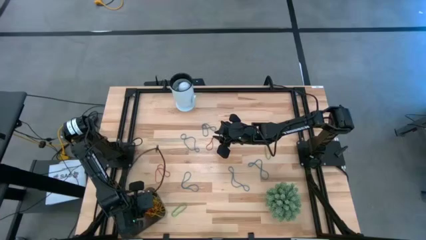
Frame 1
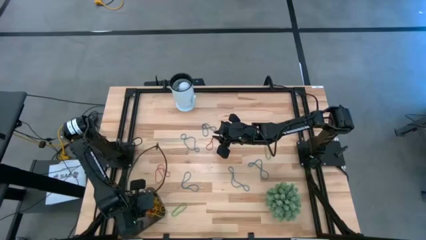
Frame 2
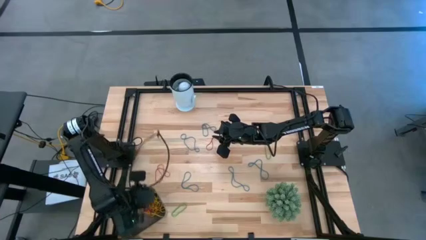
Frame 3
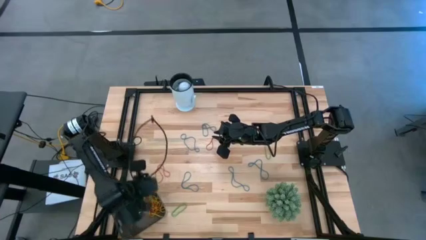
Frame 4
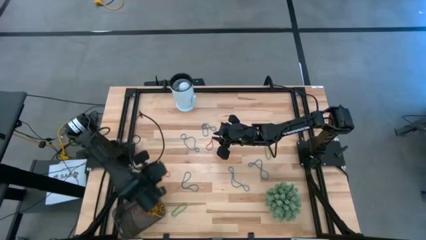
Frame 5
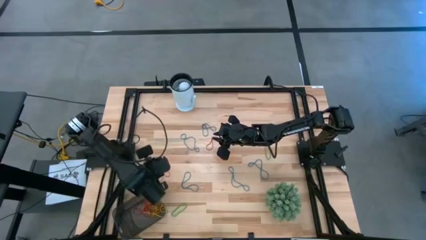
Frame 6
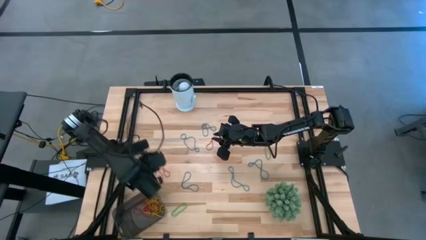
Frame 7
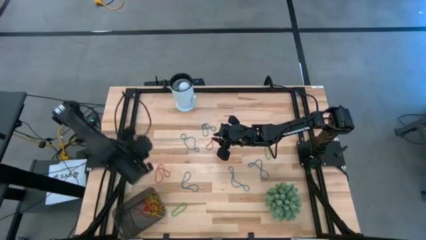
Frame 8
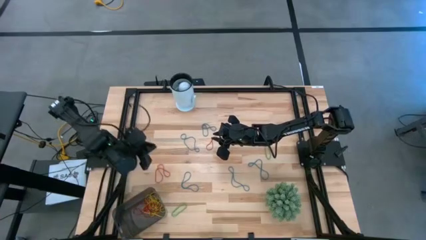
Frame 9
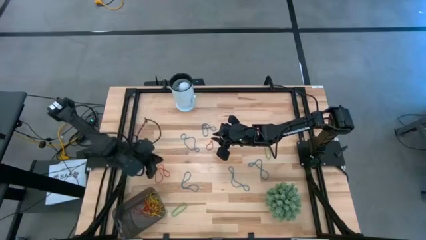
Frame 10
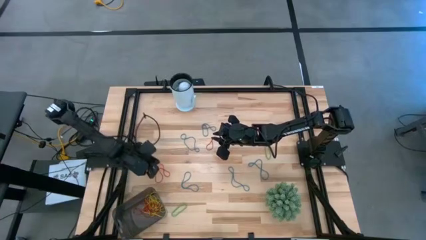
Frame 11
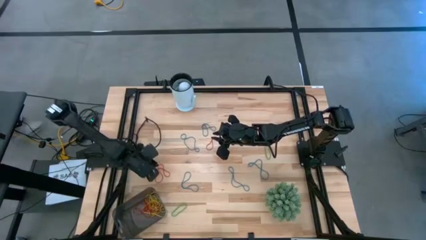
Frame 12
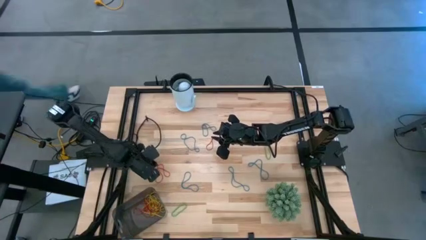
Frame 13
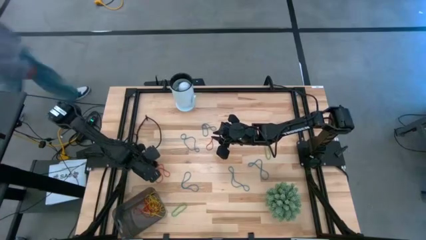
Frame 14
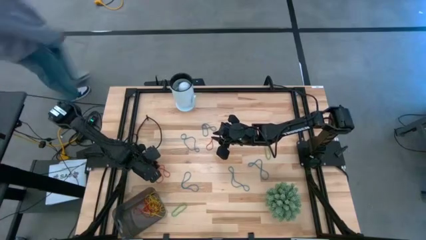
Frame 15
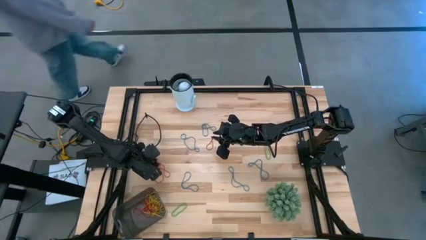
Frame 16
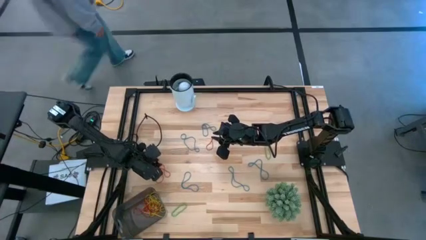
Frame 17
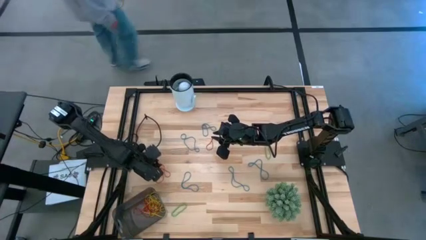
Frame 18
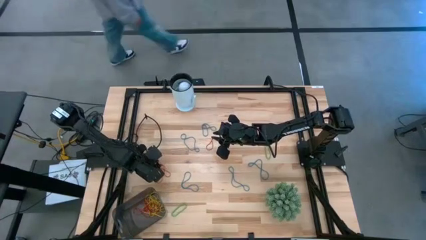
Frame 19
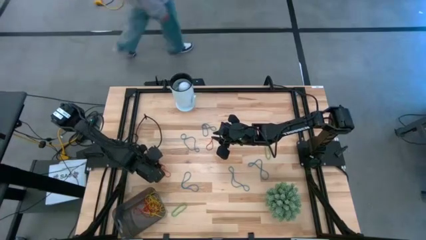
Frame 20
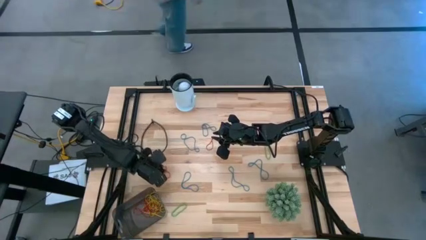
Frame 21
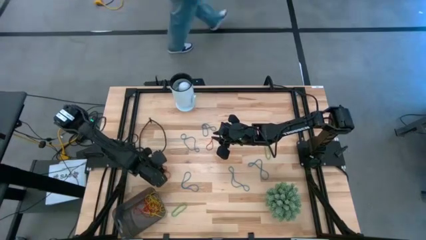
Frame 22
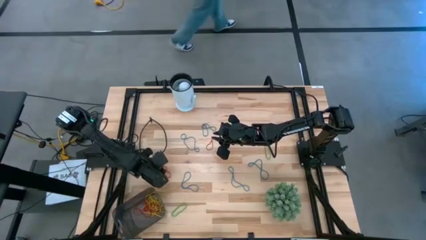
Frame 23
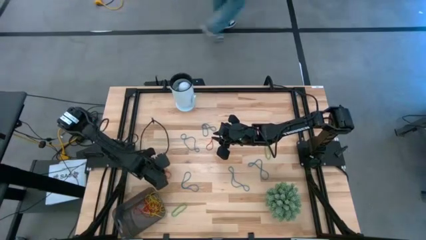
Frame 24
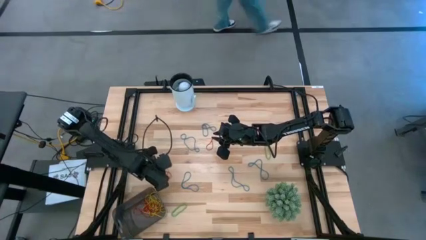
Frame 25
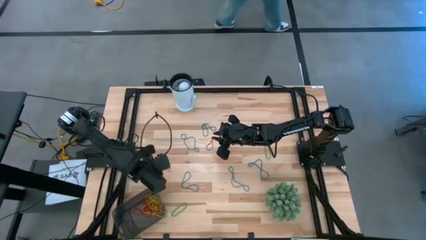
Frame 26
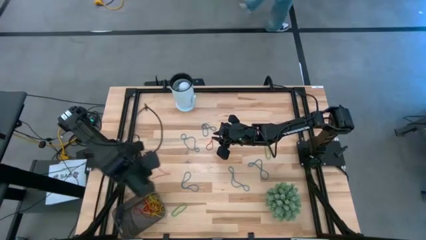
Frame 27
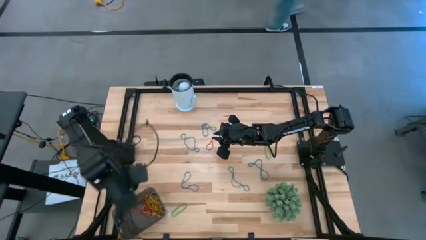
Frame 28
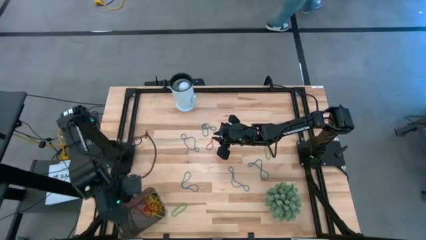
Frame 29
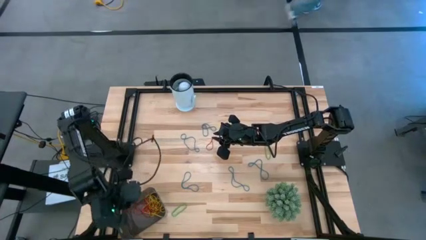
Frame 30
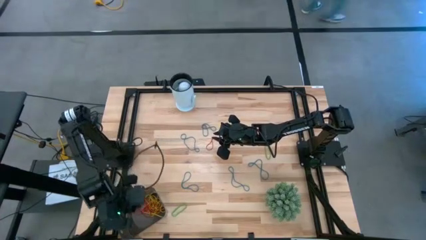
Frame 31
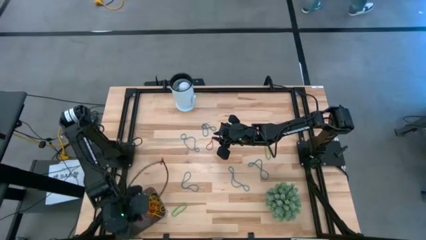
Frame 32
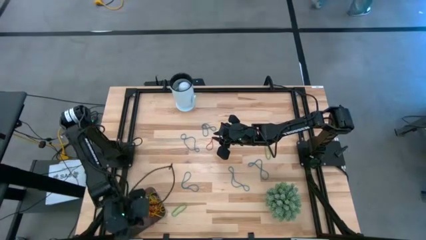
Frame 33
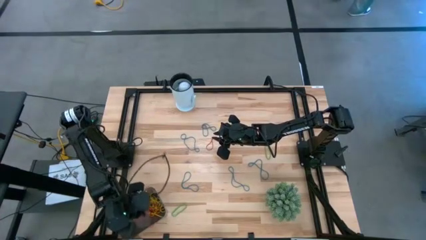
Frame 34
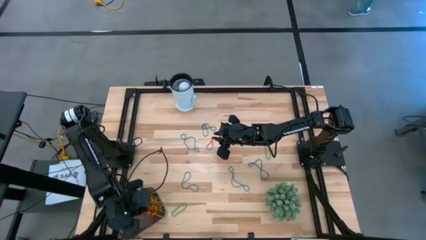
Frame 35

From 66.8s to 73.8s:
Task: Pick and place items into bin
Put the red rubber band into the black bin

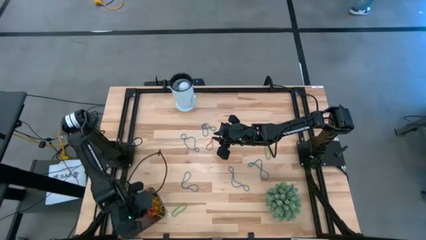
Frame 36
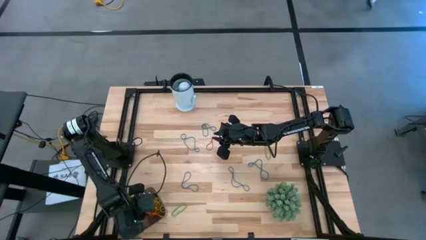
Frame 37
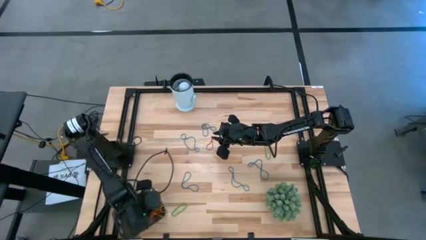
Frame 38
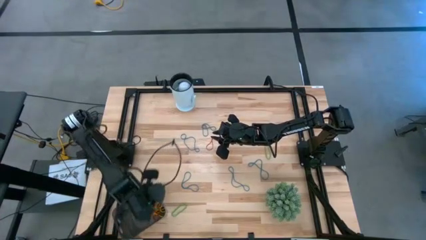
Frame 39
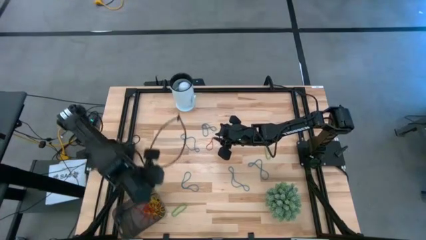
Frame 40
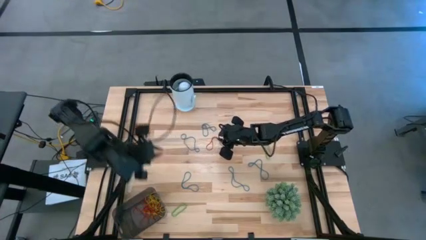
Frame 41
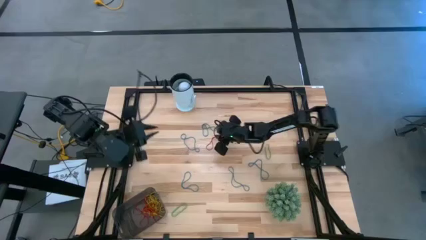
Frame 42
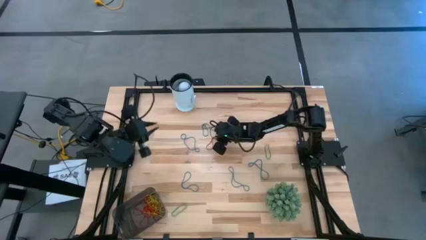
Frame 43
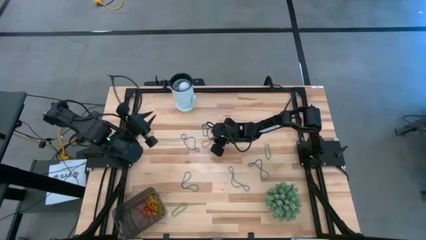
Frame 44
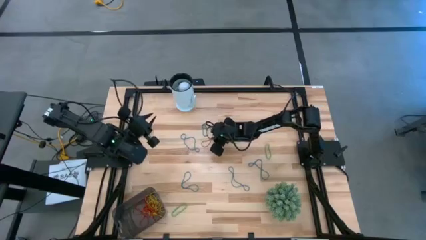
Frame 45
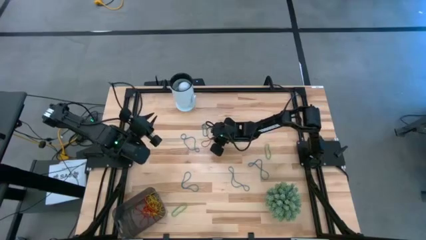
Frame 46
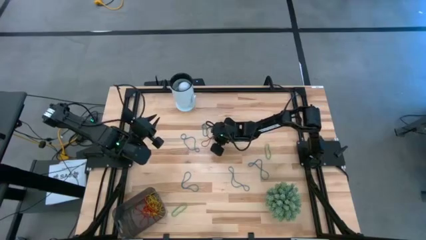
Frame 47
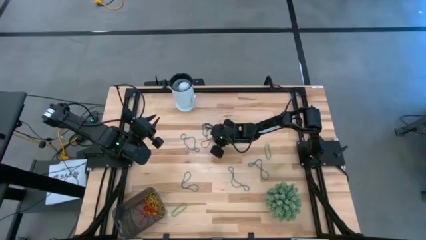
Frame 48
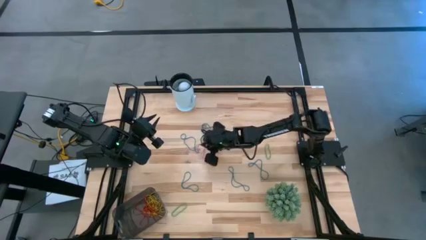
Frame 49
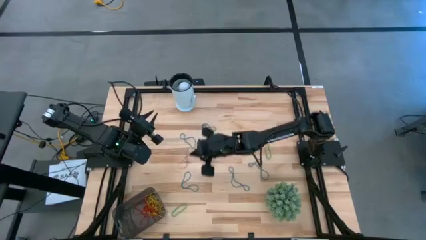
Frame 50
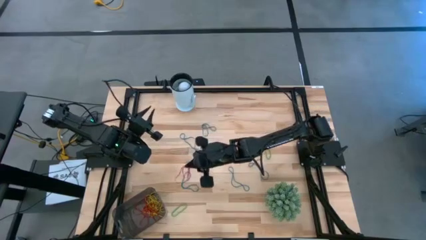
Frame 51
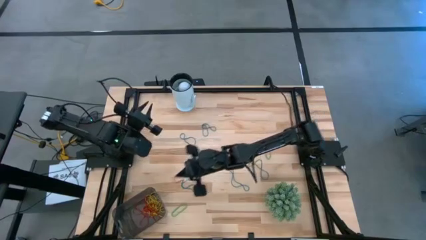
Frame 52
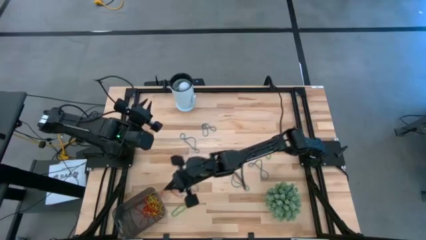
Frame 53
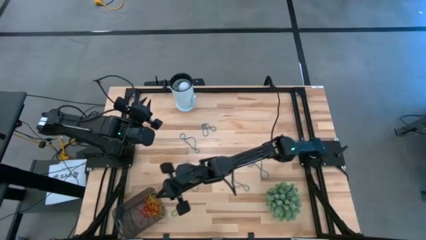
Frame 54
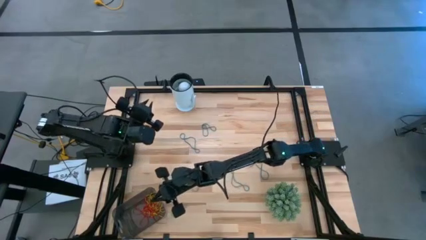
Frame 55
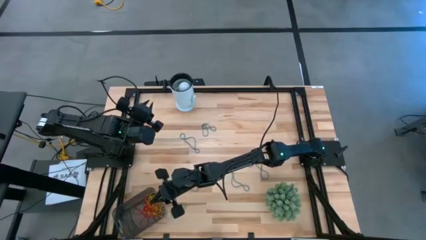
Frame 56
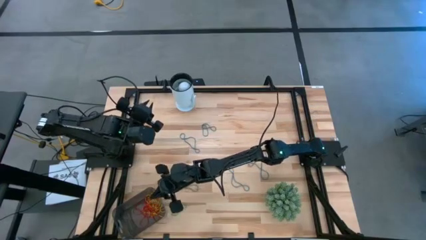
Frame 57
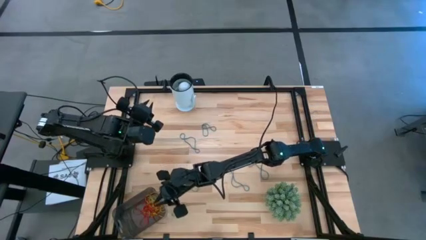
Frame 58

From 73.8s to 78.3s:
Put the red rubber band into the black bin

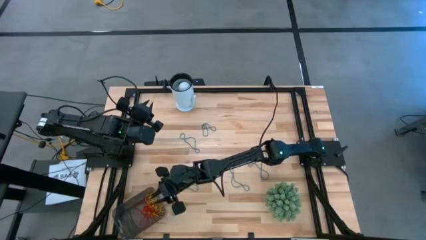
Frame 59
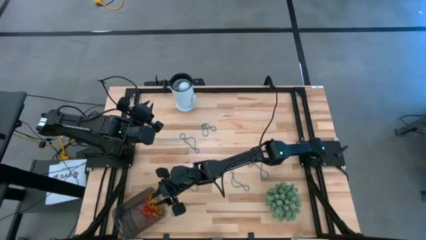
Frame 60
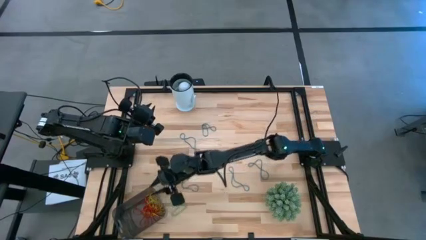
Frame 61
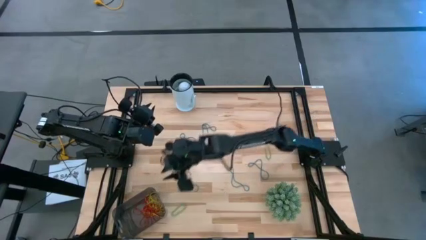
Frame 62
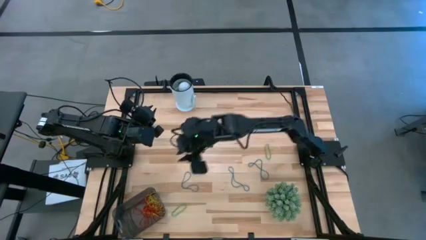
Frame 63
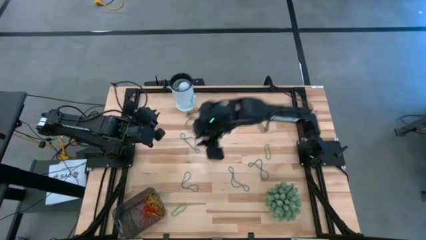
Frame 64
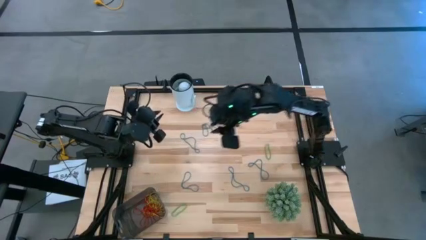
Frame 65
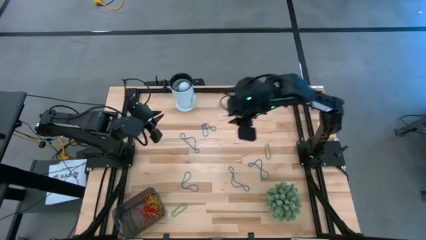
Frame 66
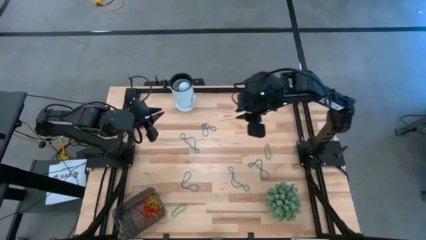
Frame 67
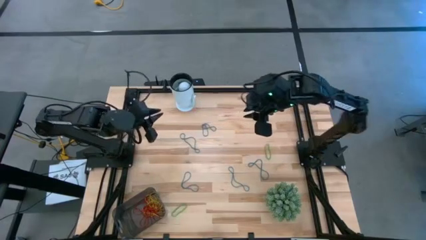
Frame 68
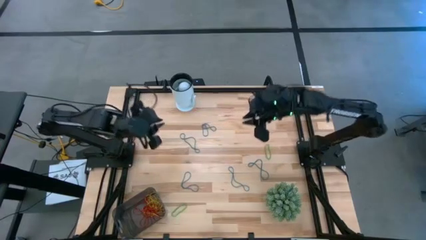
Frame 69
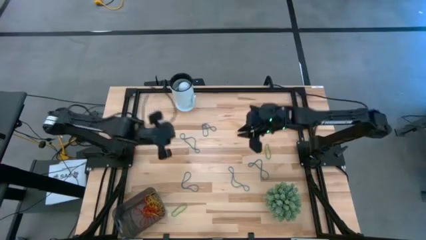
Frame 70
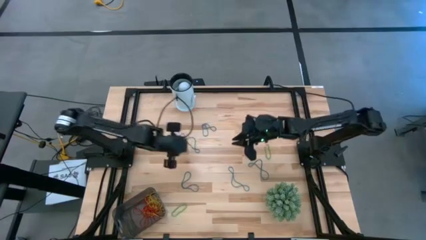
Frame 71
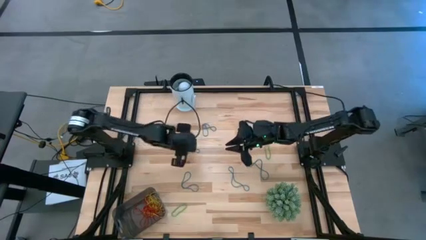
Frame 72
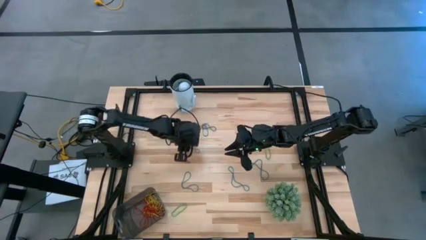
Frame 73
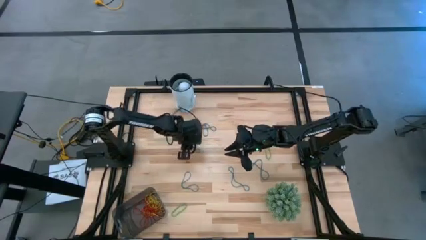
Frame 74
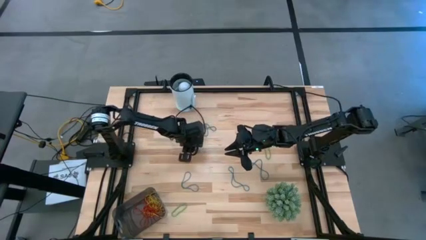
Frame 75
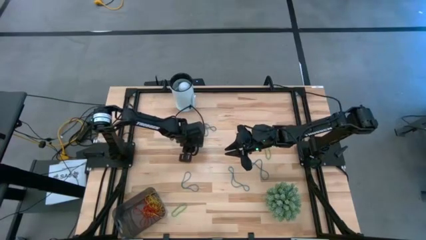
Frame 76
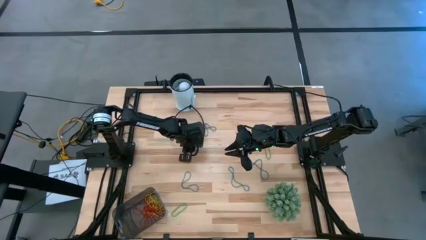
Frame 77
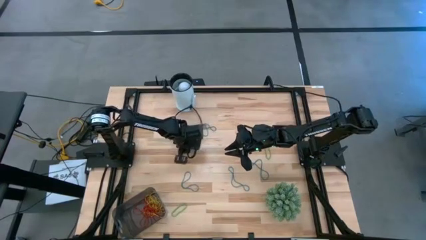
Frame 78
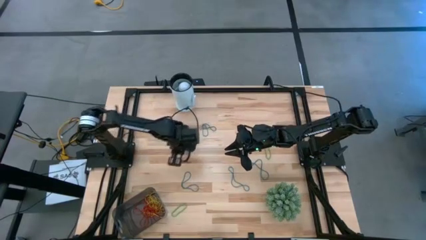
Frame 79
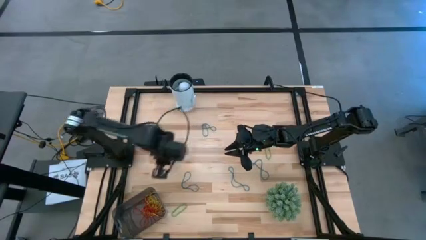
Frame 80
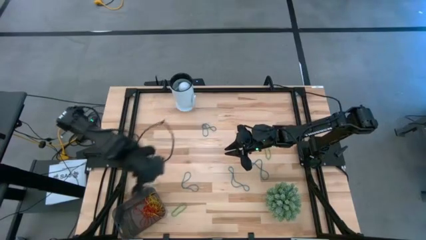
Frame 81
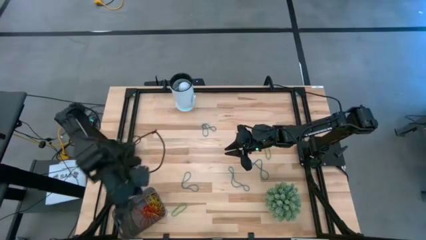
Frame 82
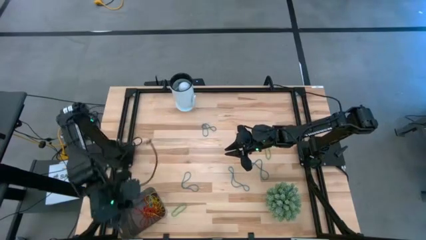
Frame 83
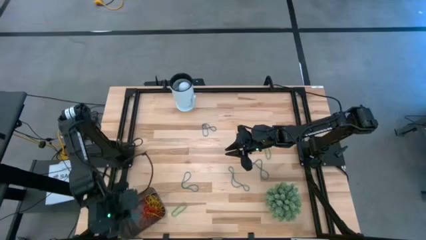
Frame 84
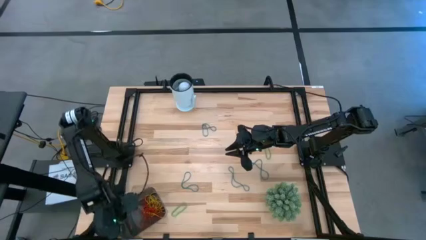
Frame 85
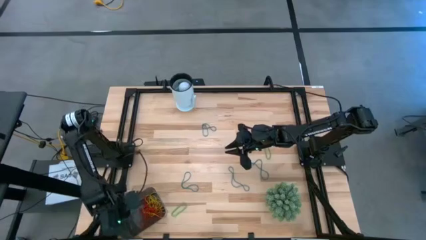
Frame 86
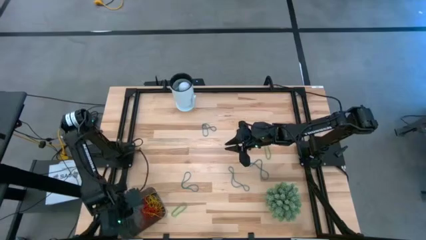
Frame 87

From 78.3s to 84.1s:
Put the blue rubber band into the black bin
